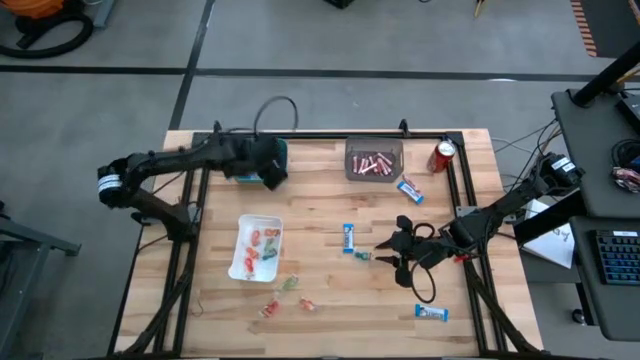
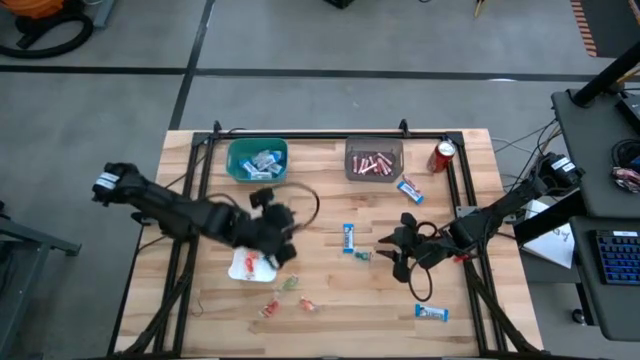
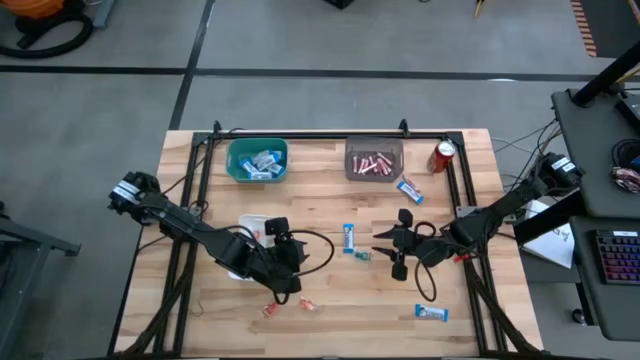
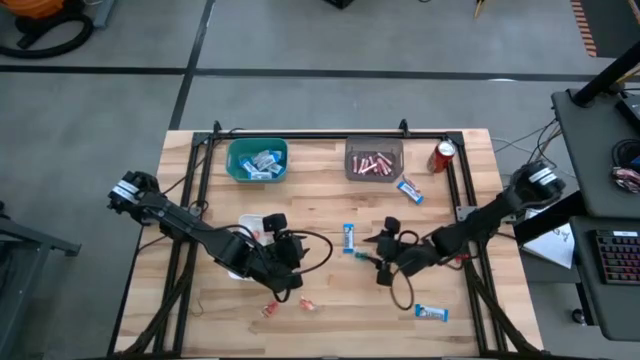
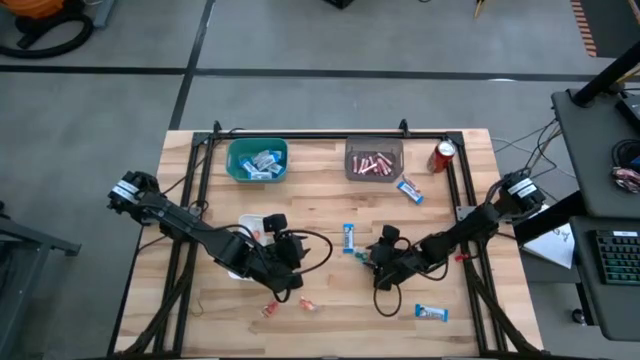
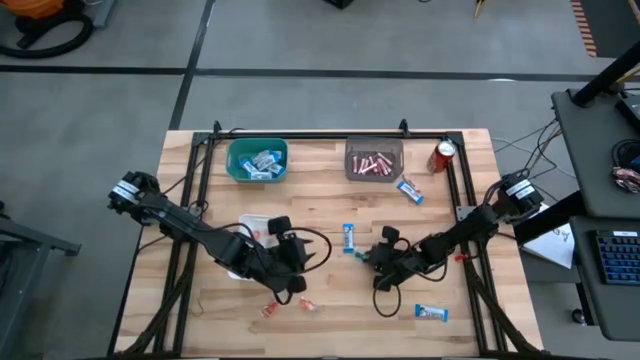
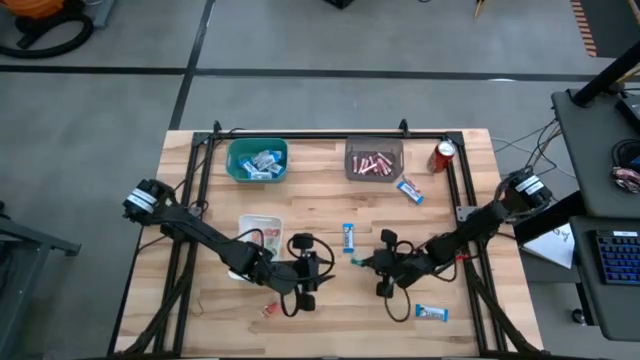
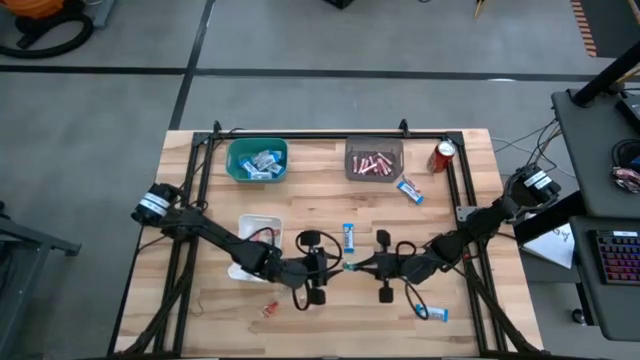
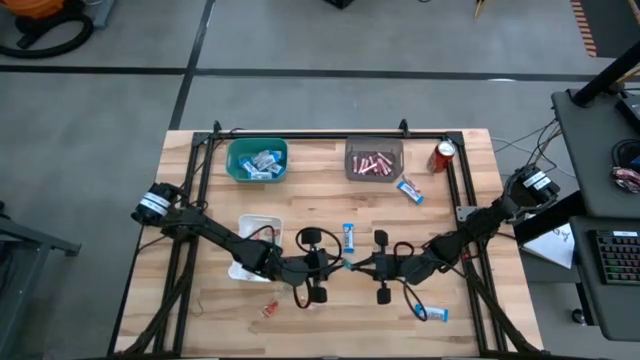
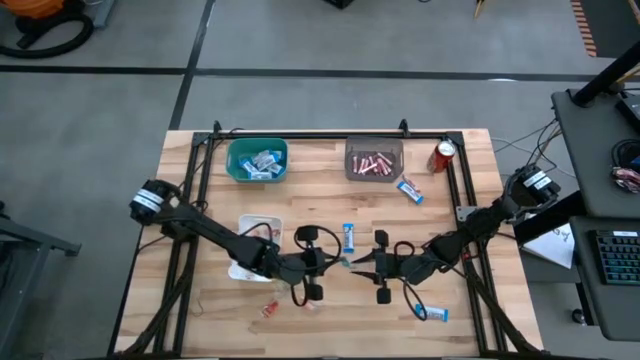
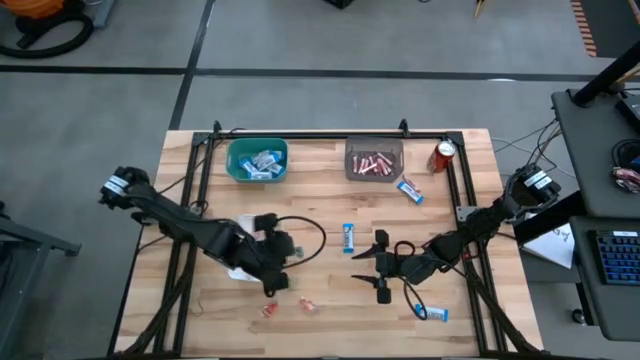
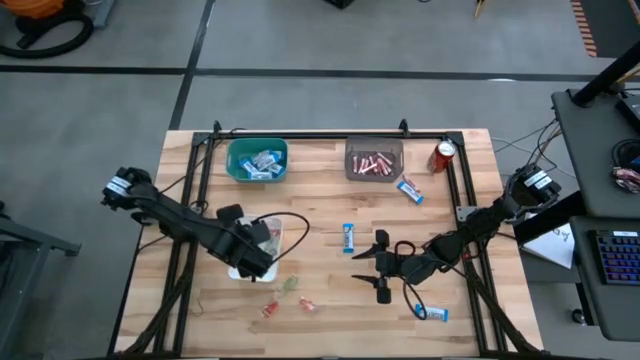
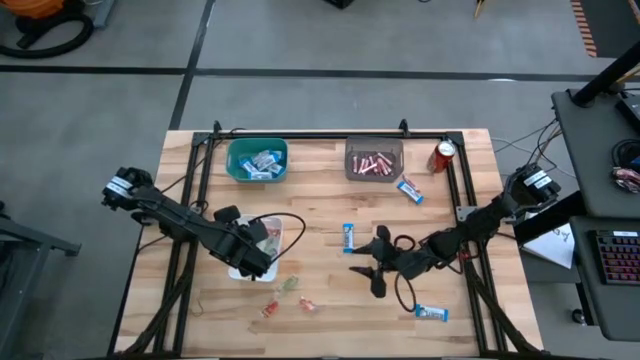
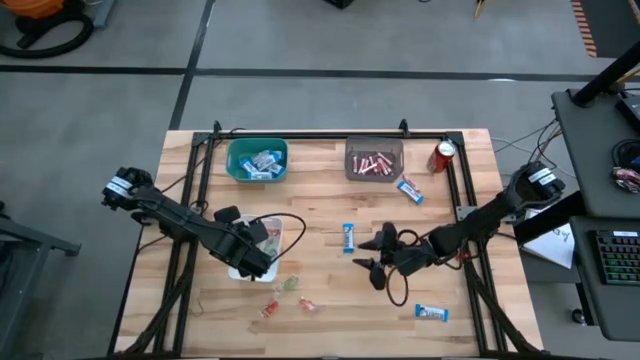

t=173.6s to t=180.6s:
Task: Sort candy
Put the blue gummy candy into the white bin

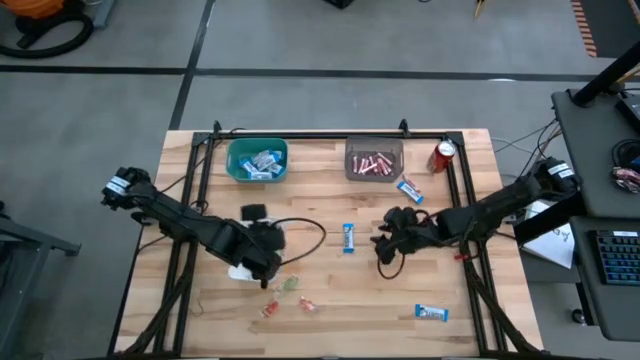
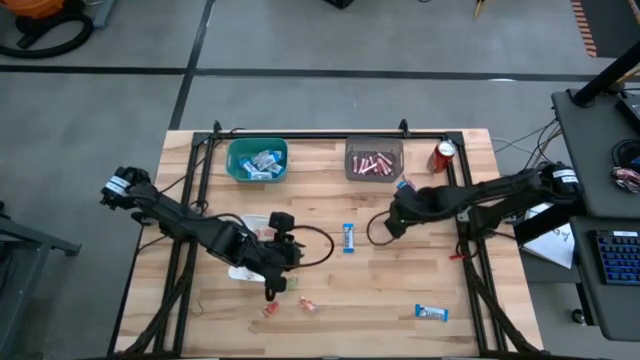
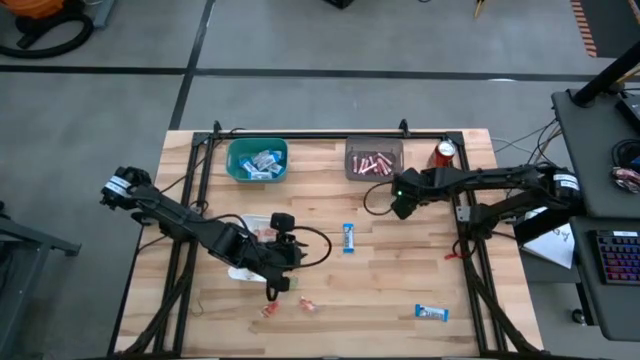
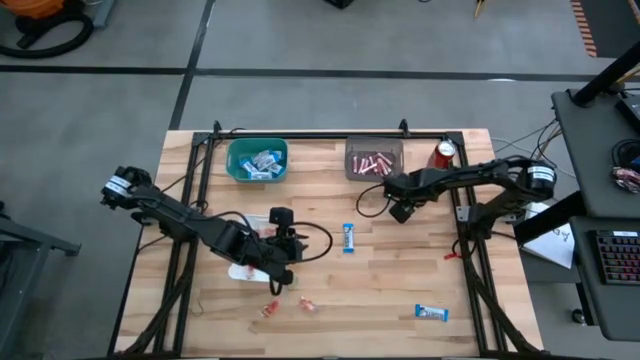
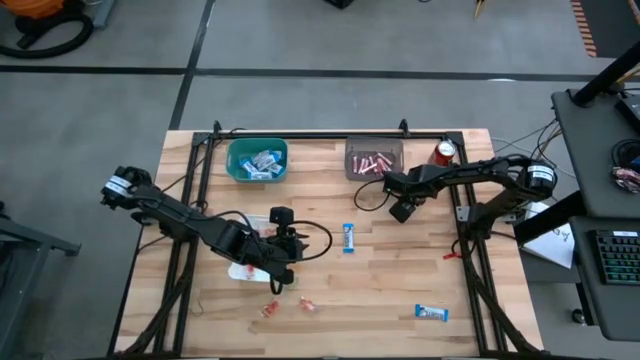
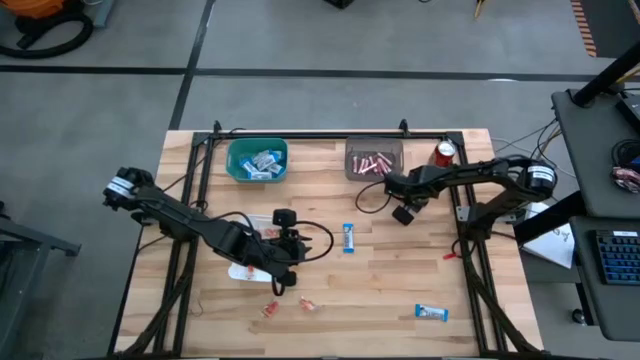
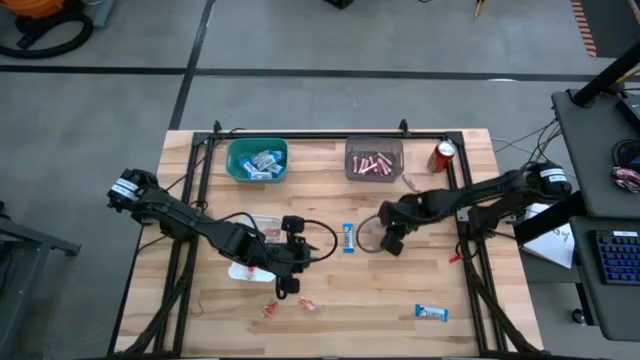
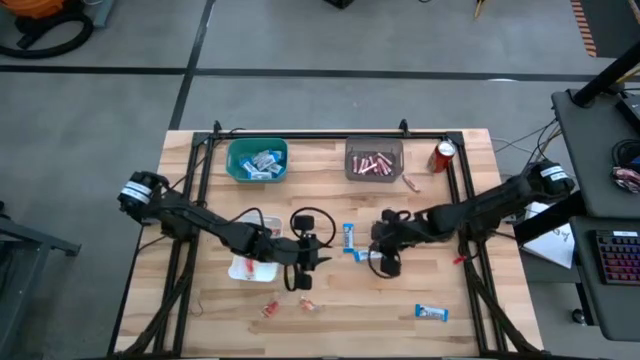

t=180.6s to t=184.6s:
Put the white chocolate bar into the green bin

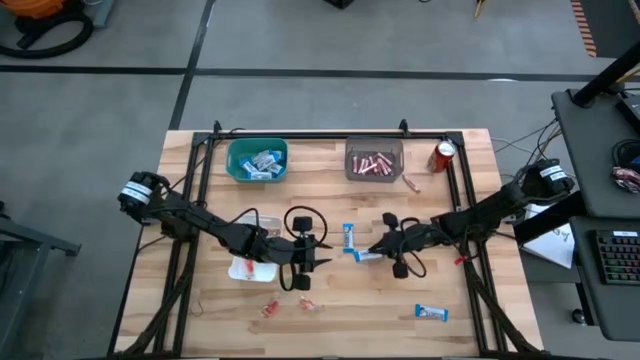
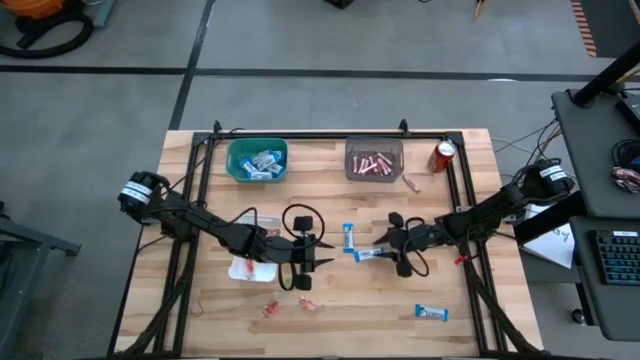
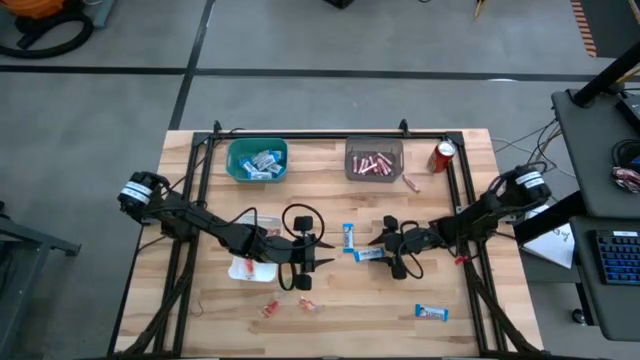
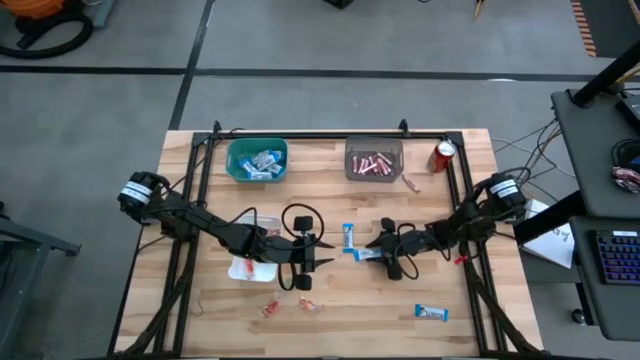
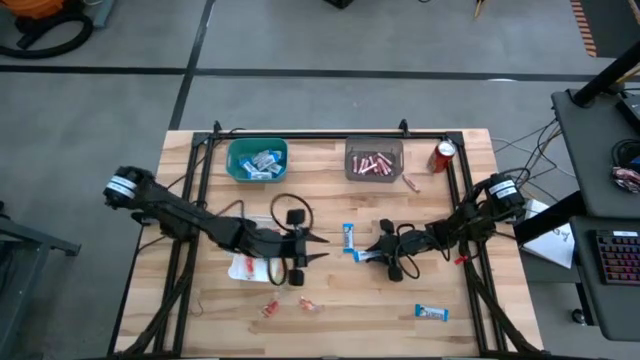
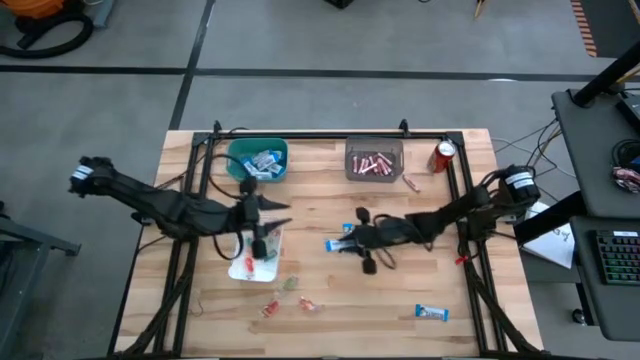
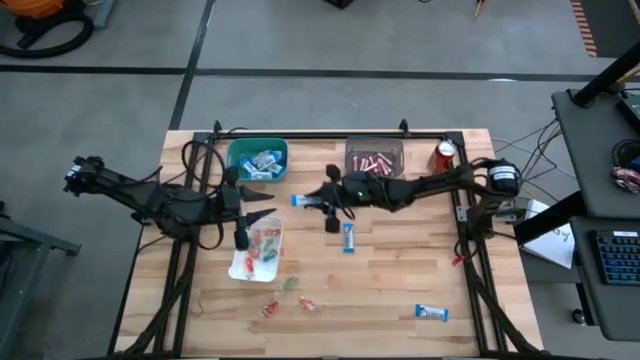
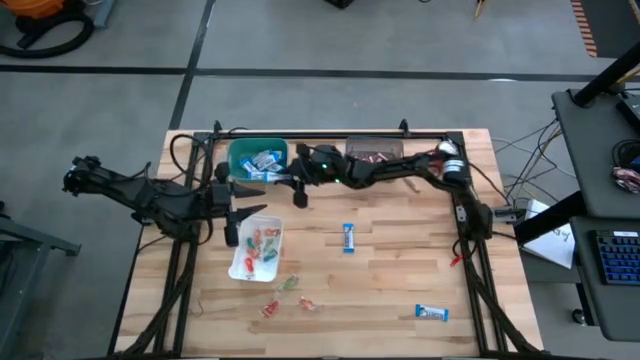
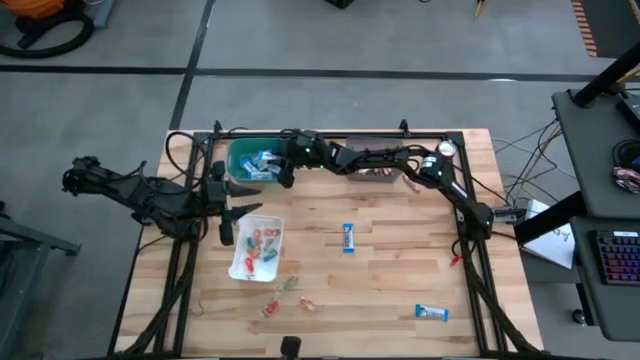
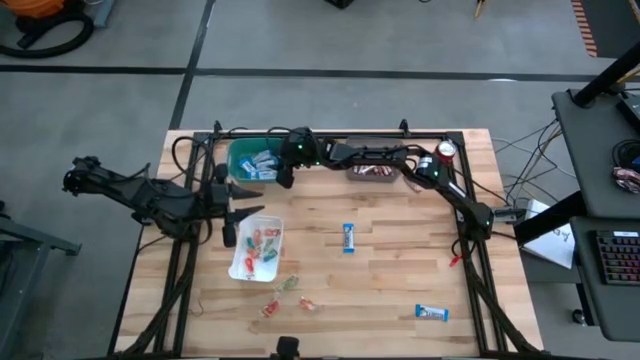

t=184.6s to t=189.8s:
Put the white chocolate bar into the green bin

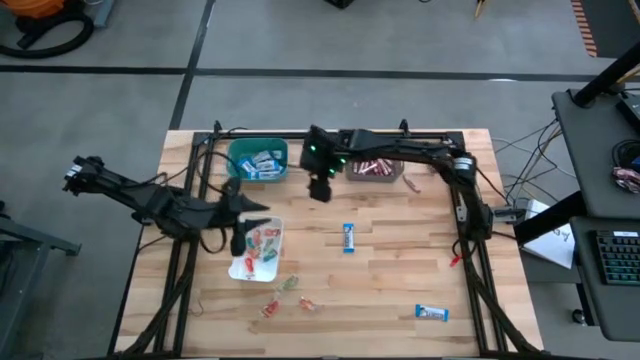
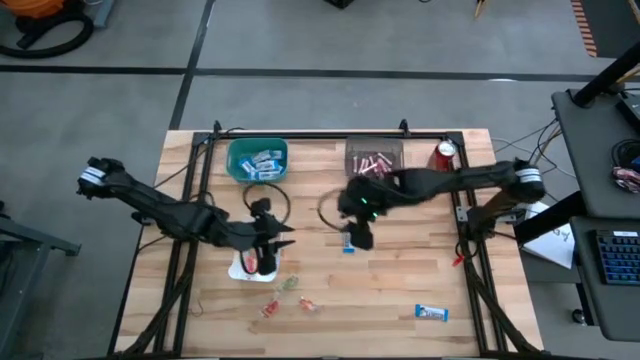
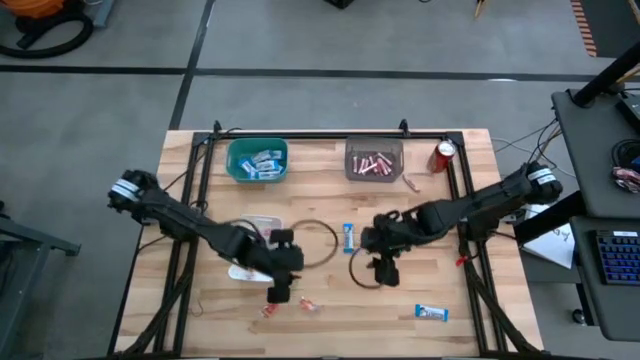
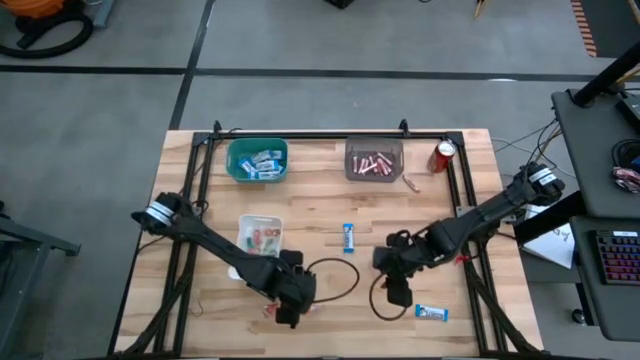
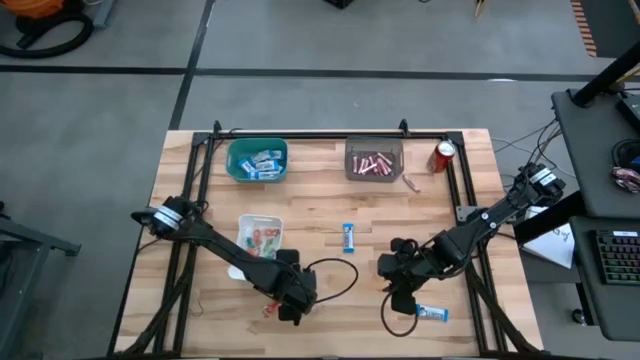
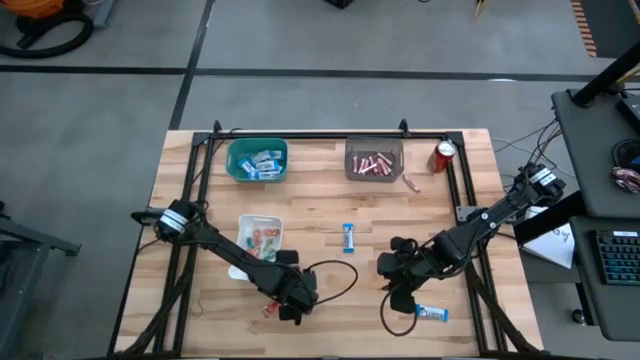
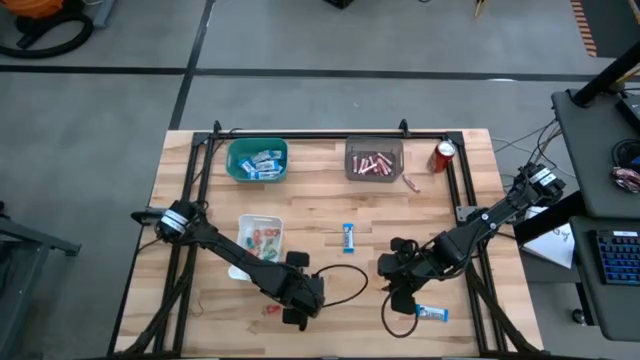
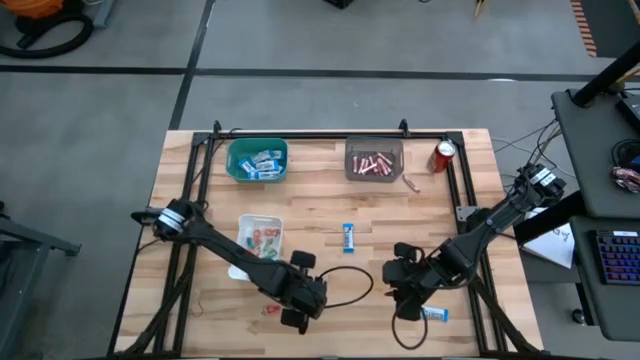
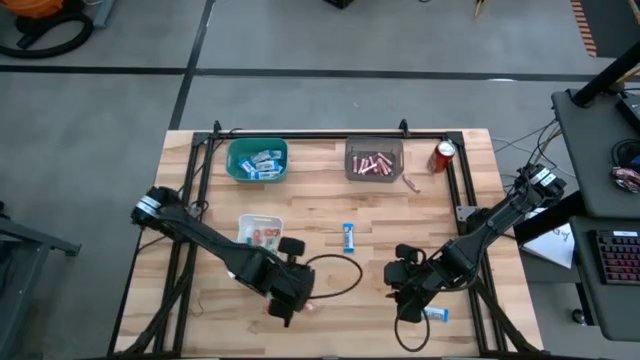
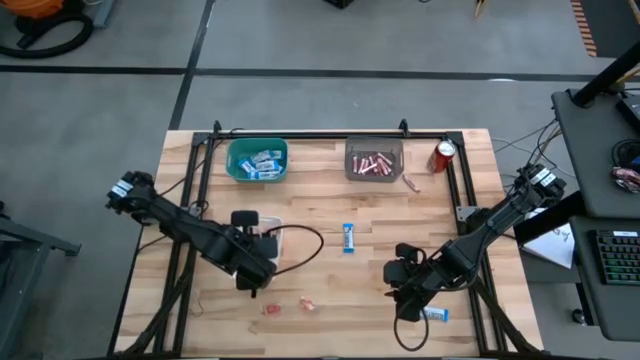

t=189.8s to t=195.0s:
Put the green gummy candy into the white bin
